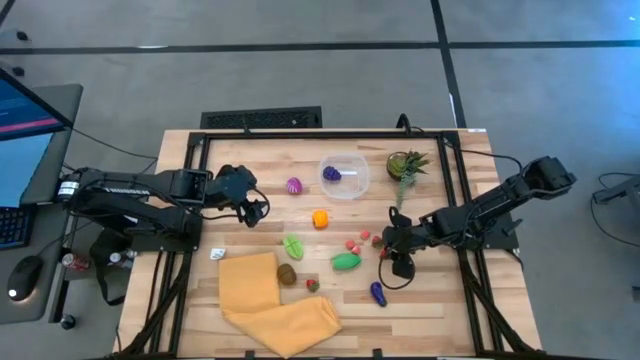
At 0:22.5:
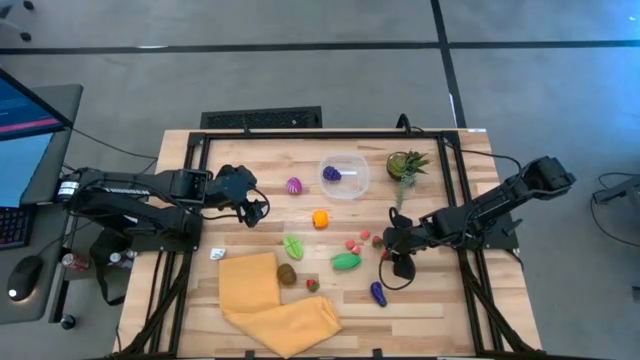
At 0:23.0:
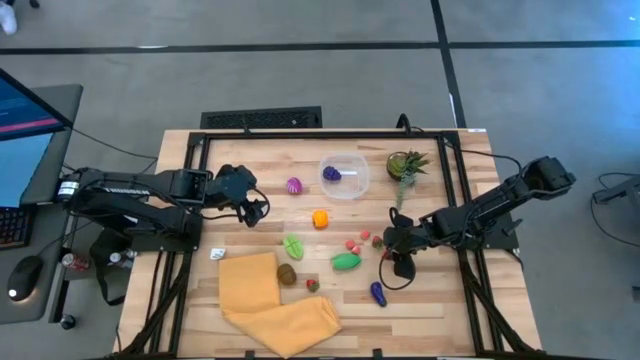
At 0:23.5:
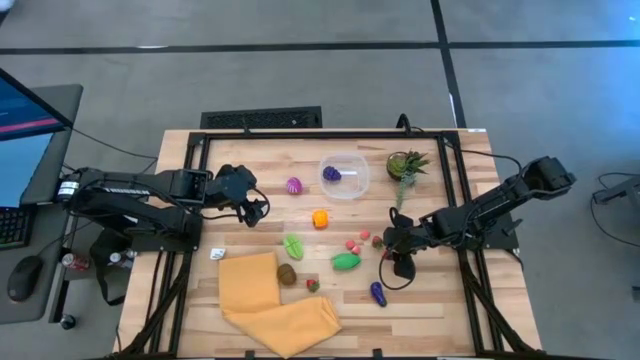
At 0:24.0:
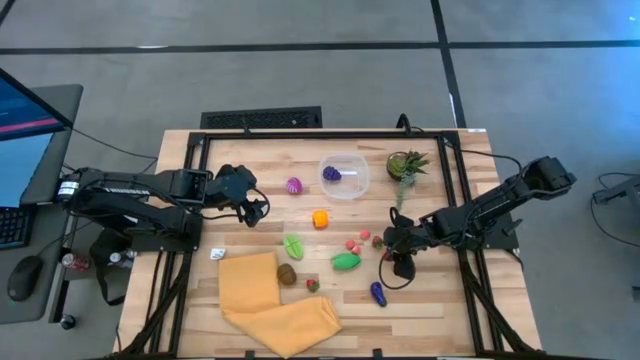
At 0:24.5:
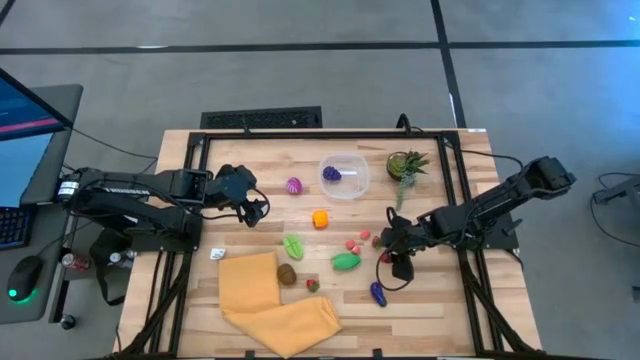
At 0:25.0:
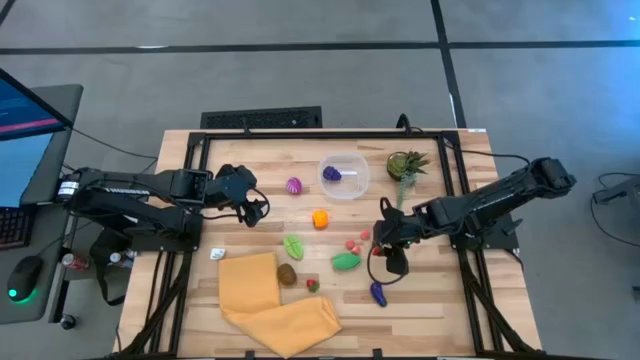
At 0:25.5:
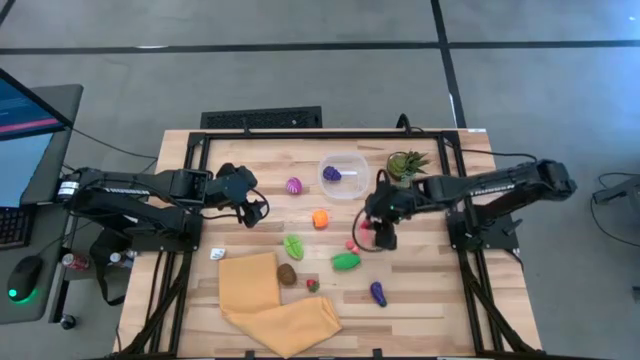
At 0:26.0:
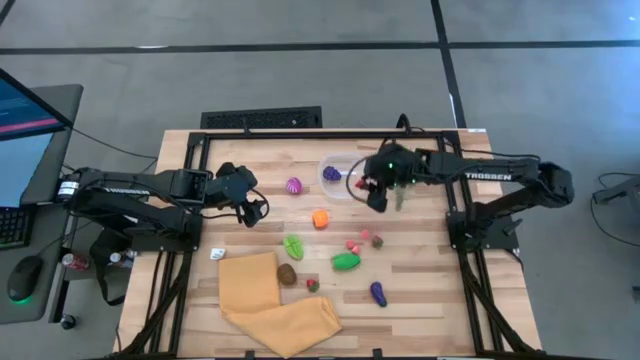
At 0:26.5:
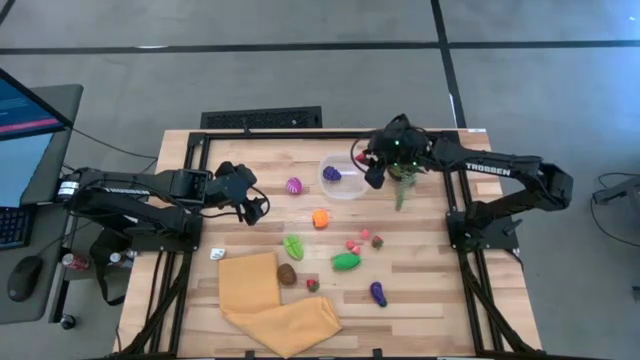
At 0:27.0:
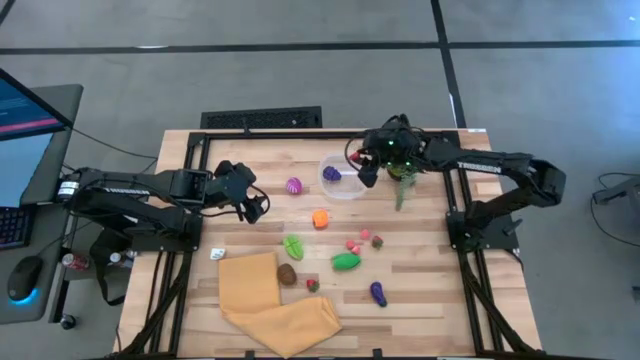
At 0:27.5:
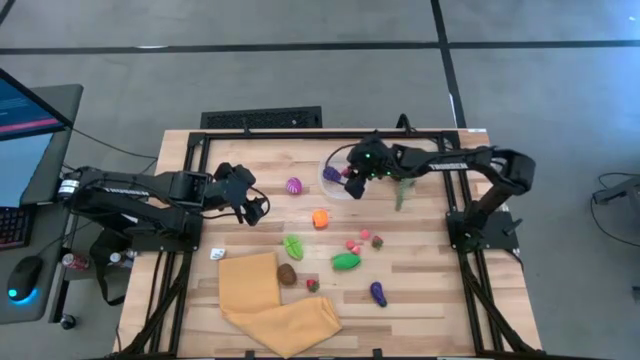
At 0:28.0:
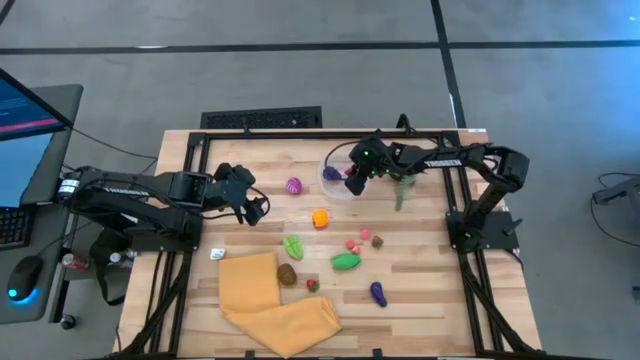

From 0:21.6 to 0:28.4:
Task: Pick and placing Produce into tupperware
Put the right strawberry in the transparent bin

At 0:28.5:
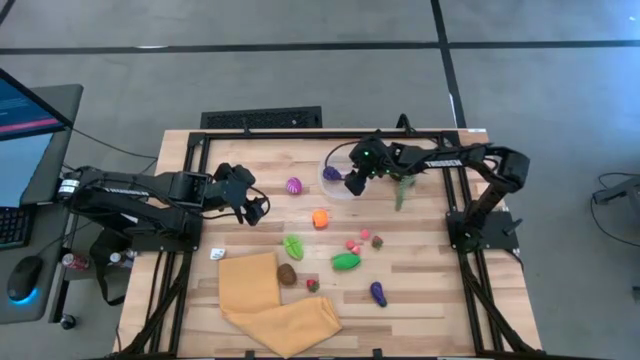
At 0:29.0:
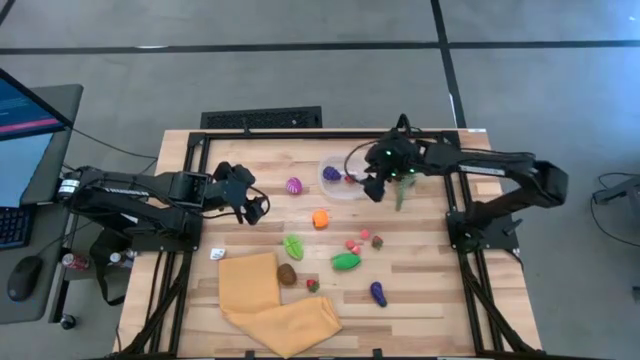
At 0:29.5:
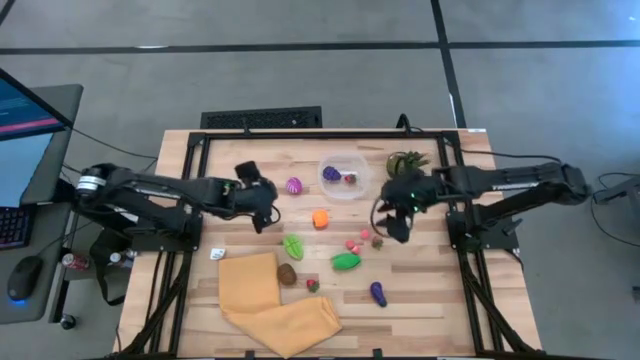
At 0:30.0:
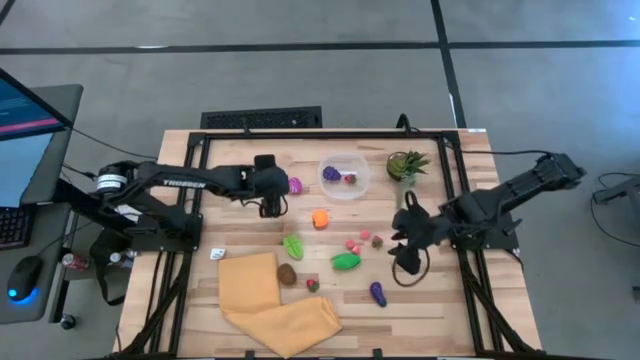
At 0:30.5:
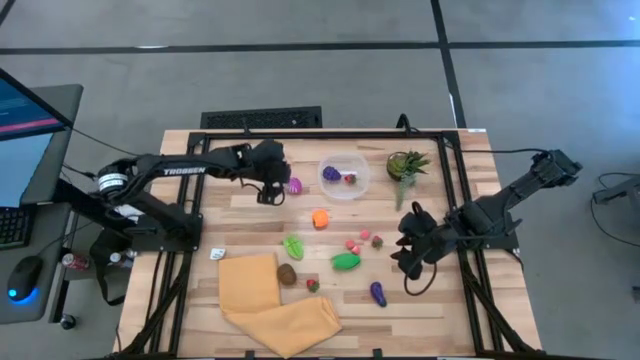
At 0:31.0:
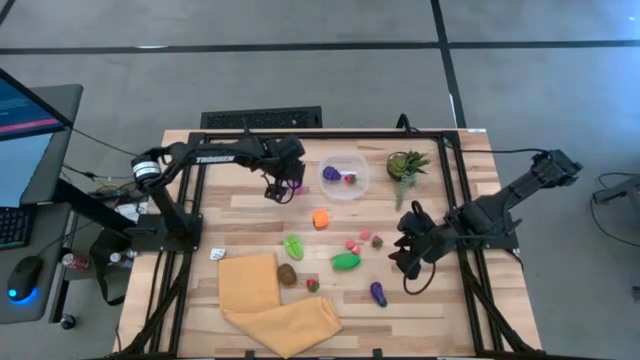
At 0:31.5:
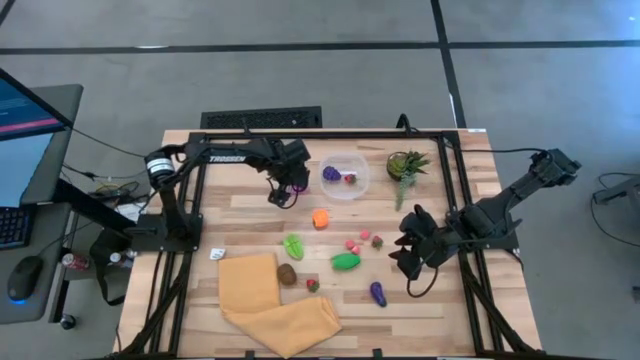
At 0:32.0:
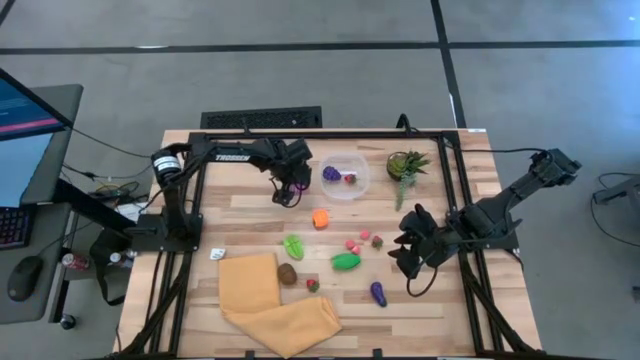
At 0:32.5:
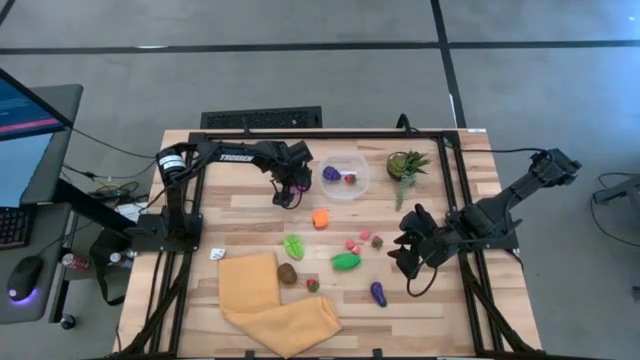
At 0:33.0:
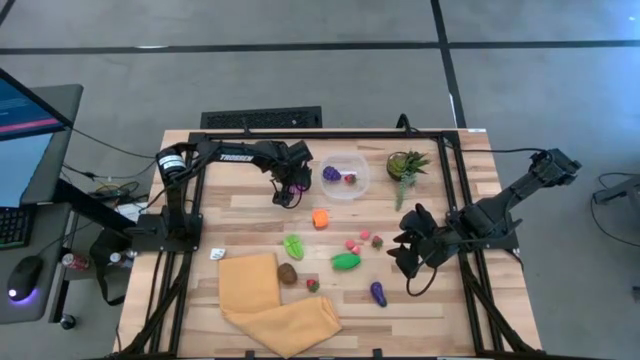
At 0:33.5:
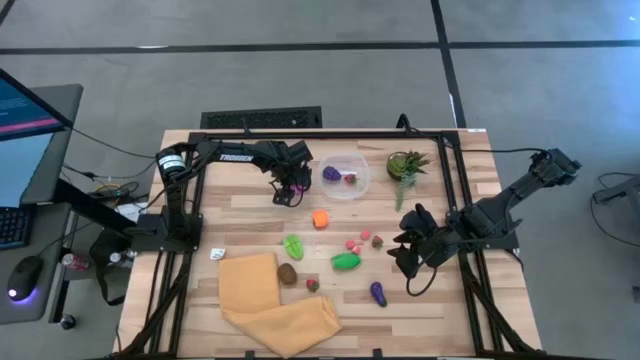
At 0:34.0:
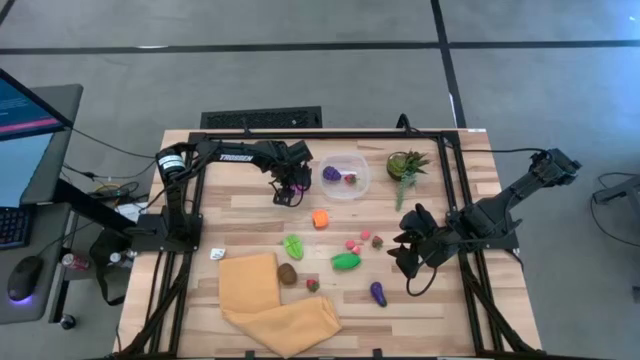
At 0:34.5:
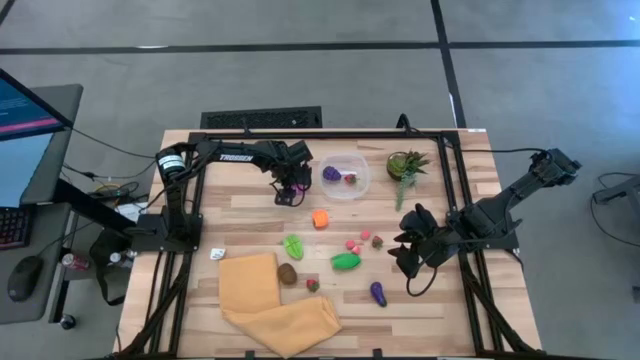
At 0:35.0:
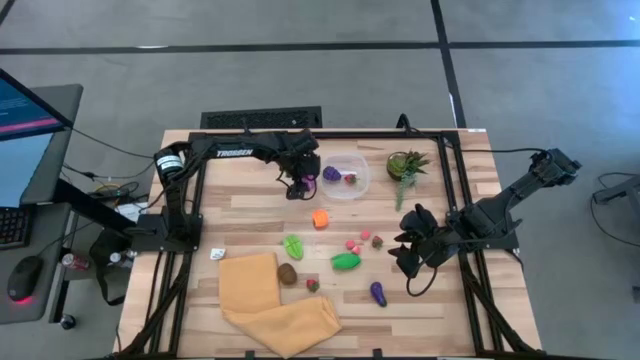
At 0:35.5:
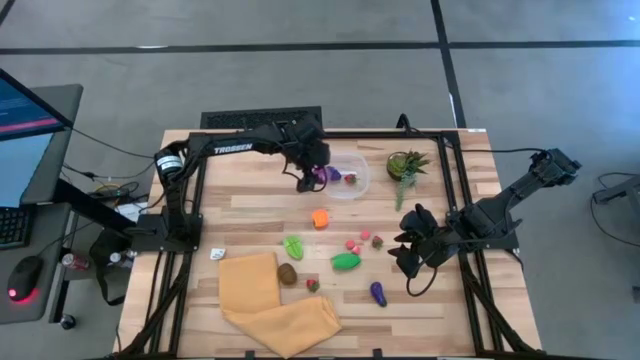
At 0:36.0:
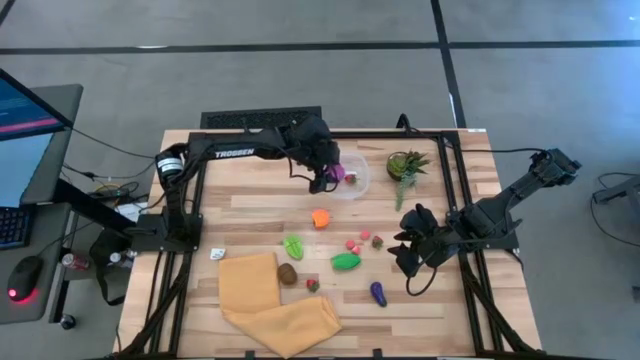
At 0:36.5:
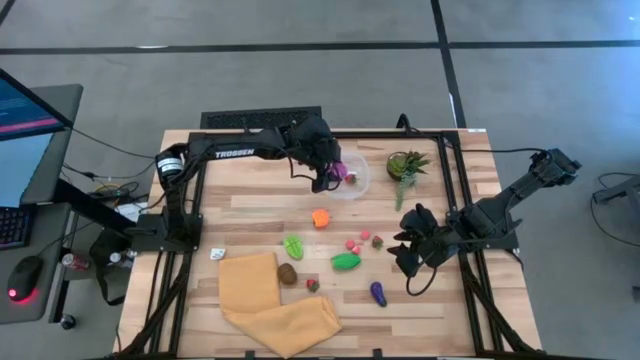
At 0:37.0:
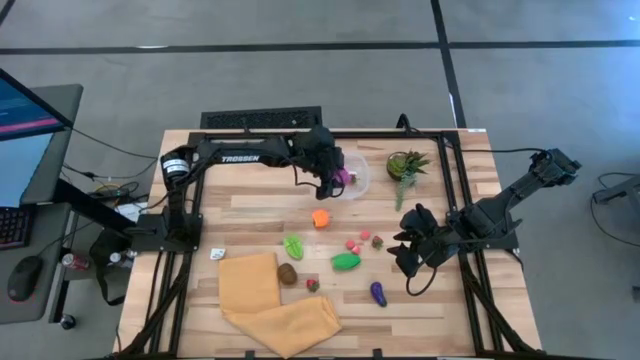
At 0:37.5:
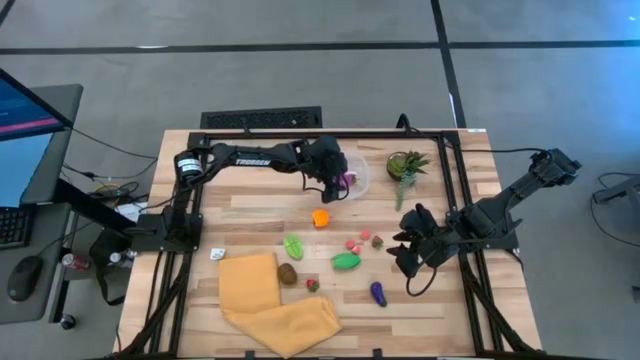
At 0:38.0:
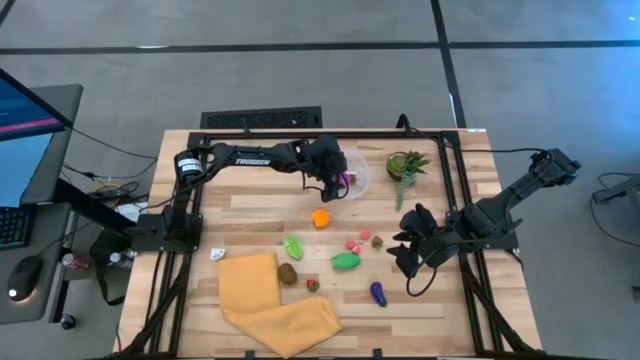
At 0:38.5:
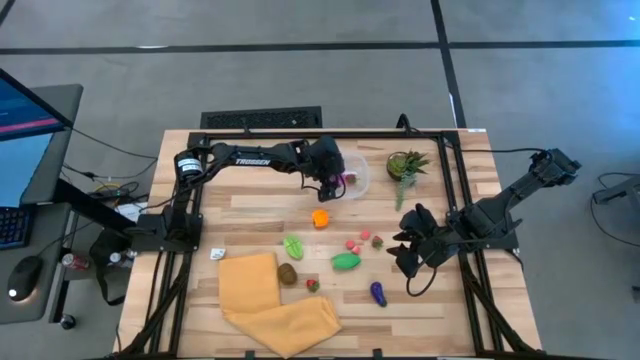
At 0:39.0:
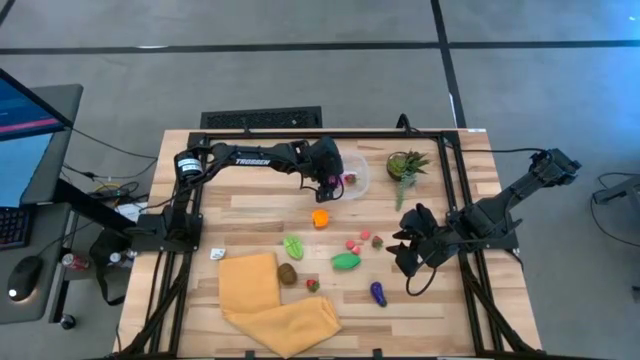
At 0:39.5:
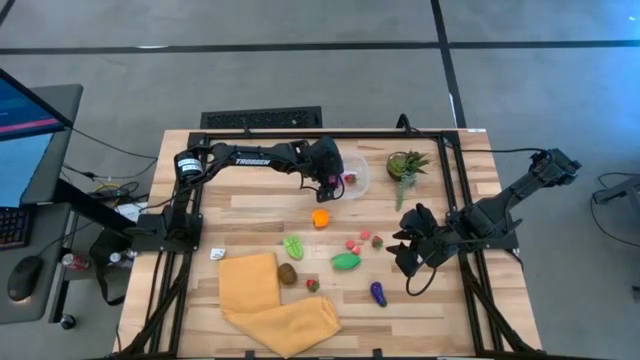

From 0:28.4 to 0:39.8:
Put the onion in the transparent bin
